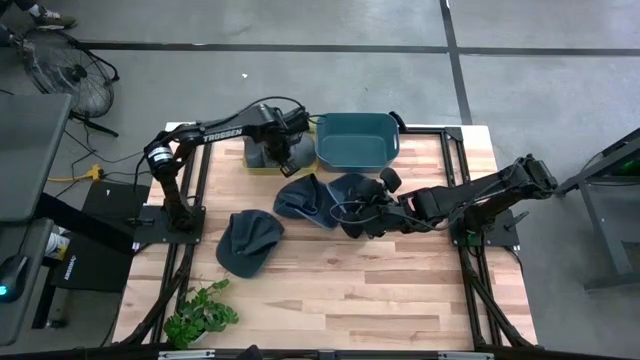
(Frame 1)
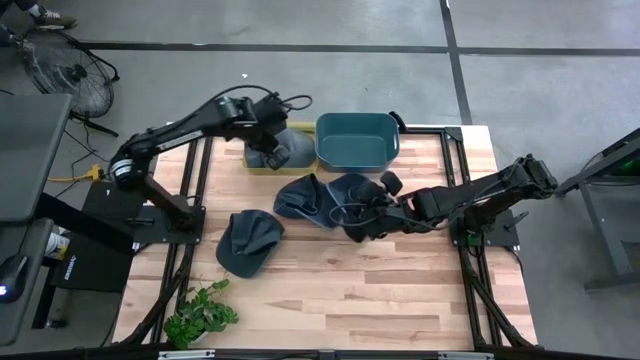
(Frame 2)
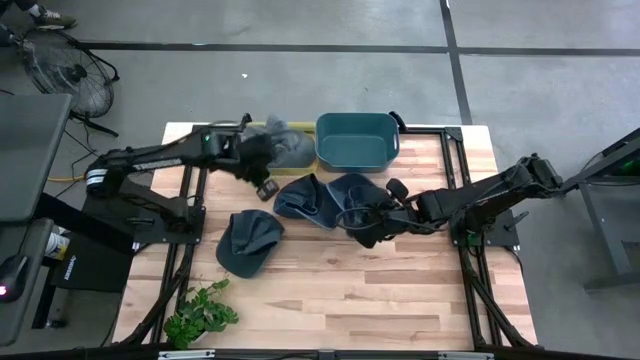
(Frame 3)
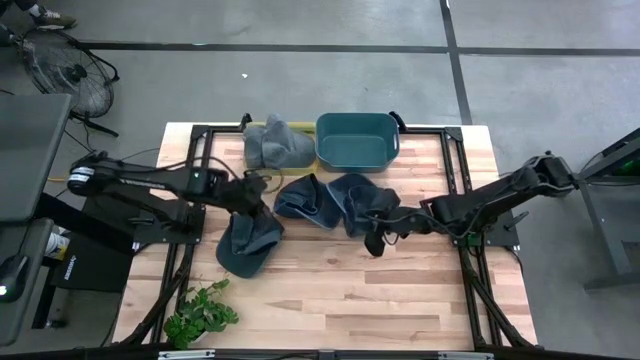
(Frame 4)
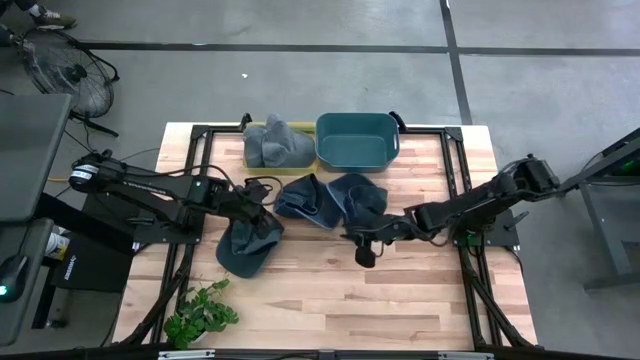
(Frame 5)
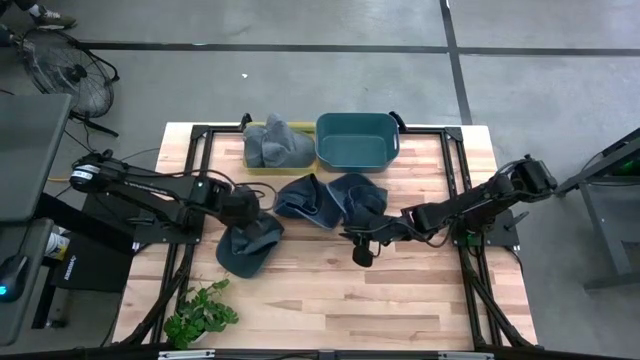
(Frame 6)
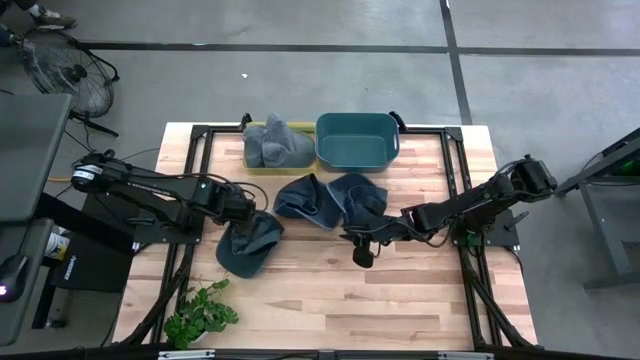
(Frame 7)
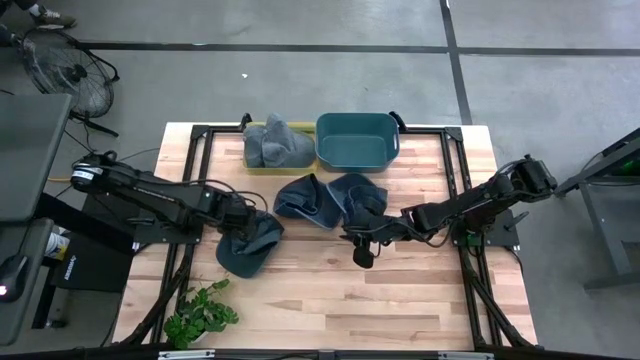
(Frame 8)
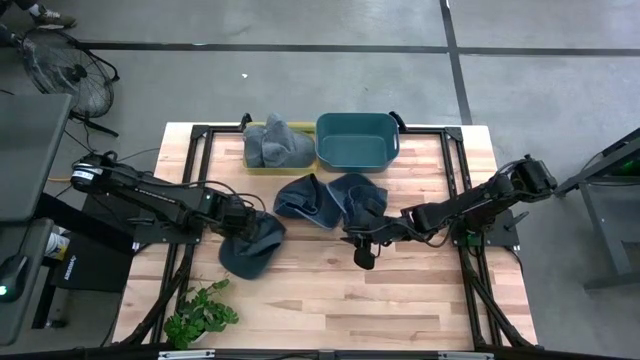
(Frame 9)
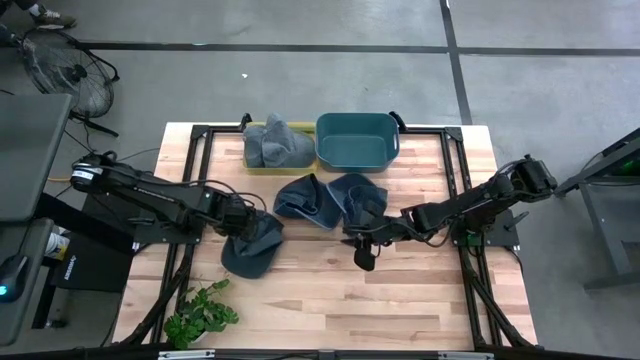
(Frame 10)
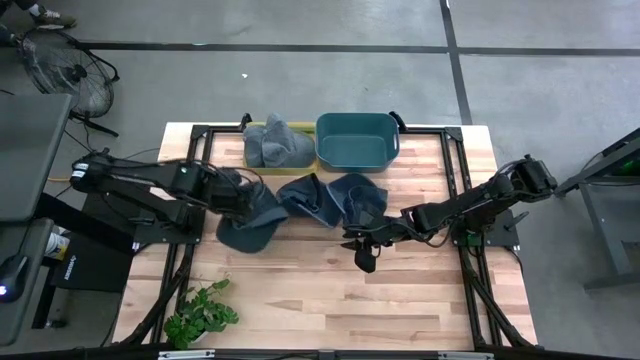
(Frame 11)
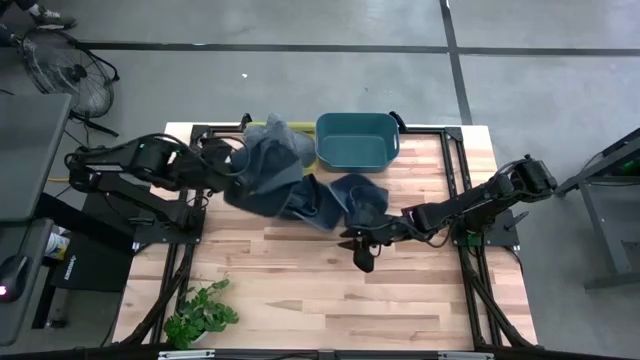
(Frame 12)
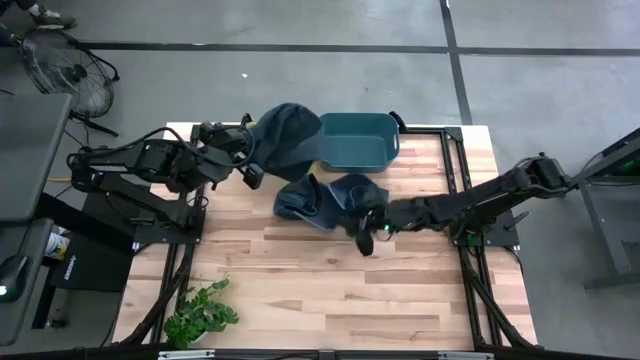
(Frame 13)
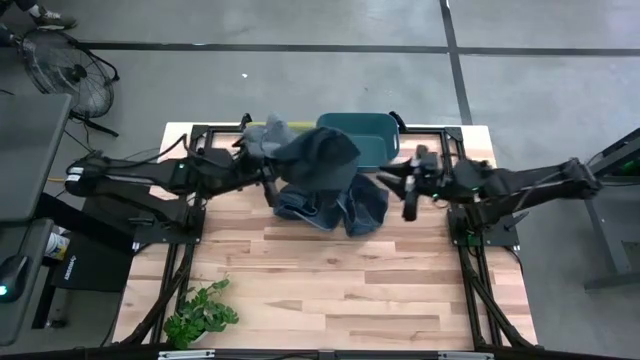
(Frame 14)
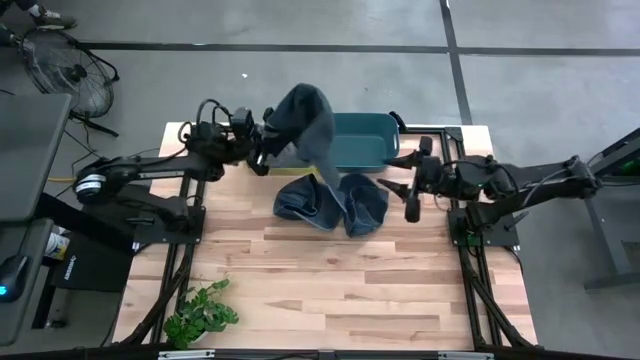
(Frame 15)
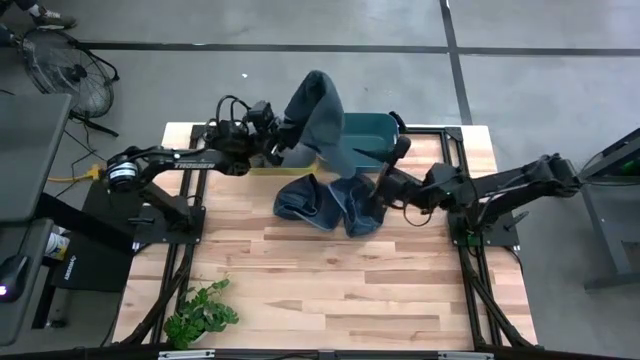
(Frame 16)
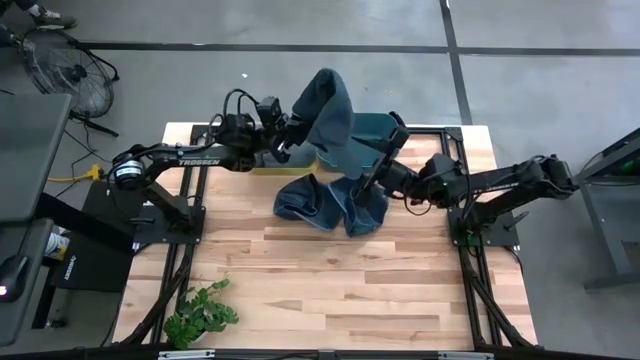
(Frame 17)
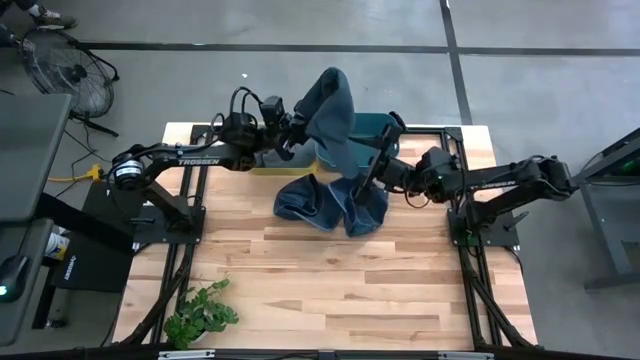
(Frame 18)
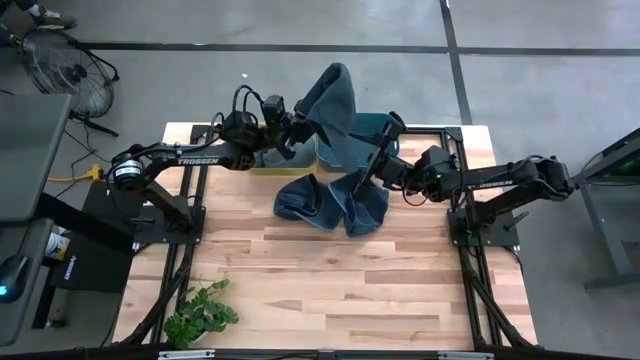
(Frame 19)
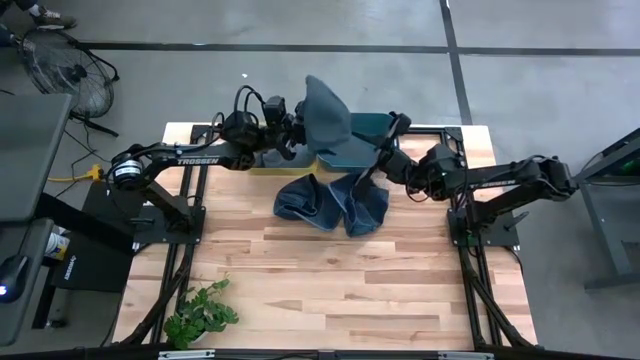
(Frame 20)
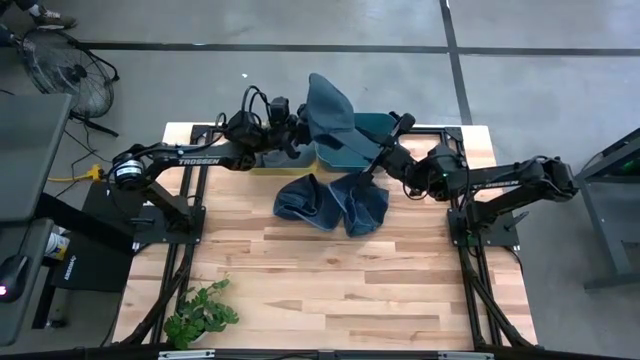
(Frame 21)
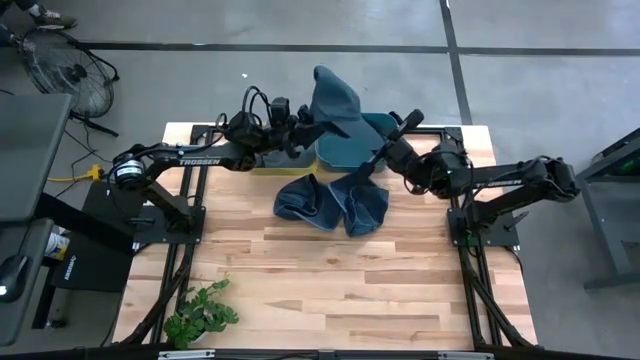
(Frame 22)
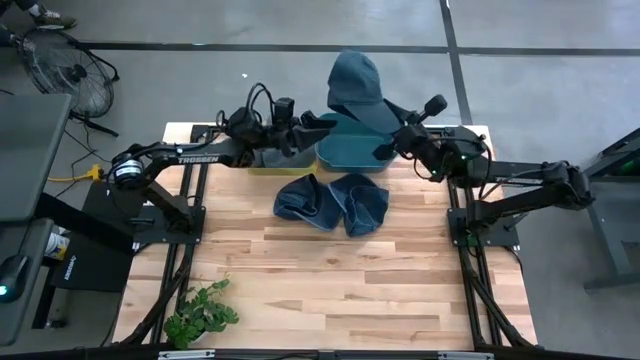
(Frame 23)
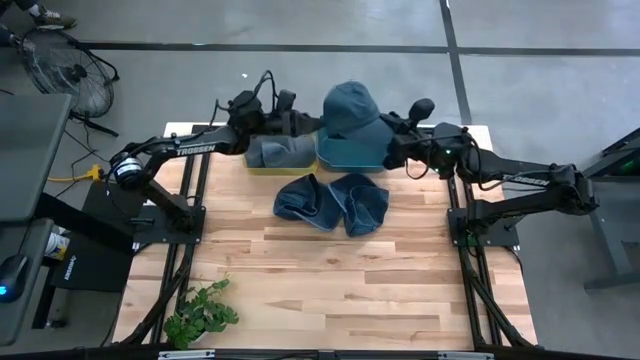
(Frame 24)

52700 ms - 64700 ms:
Task: Pick & Place hat
Put the bottom left blue cap into the blue bin

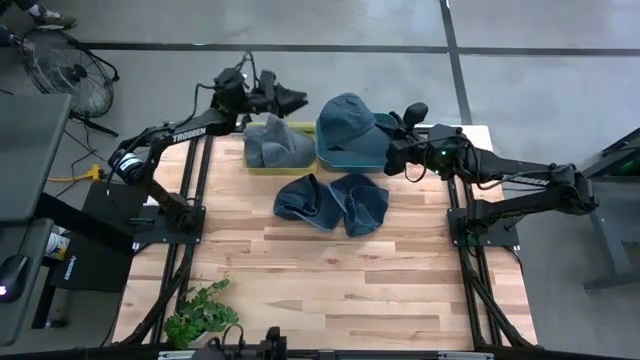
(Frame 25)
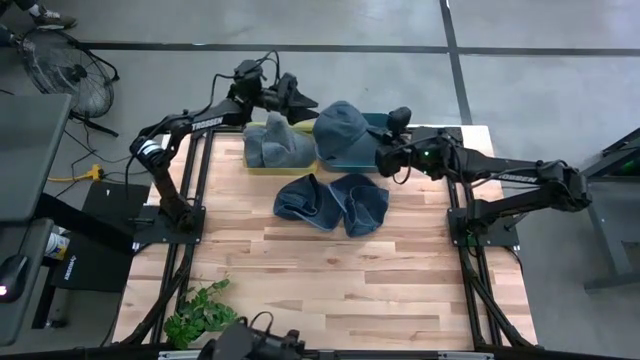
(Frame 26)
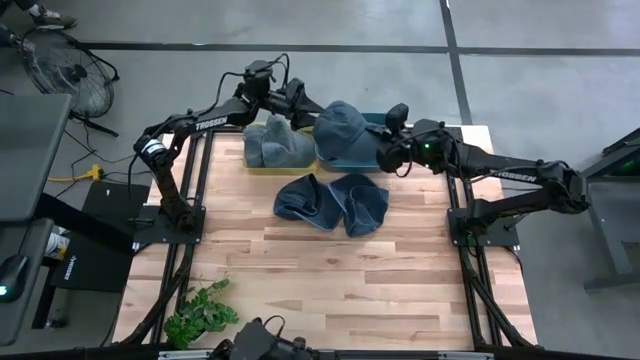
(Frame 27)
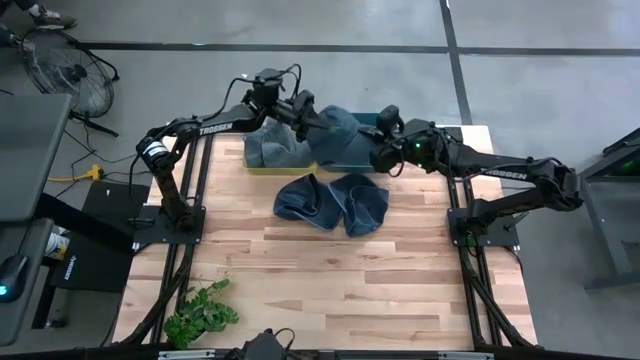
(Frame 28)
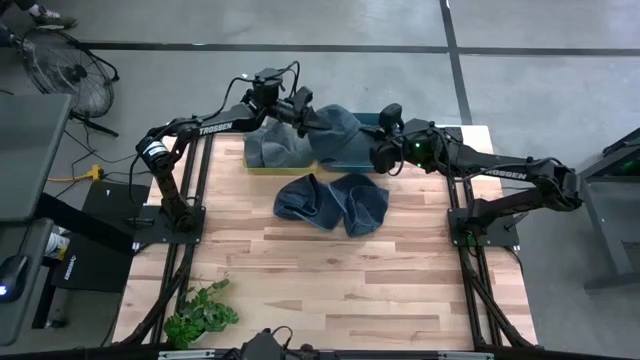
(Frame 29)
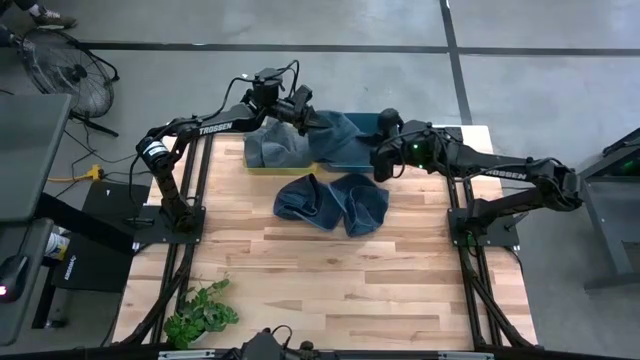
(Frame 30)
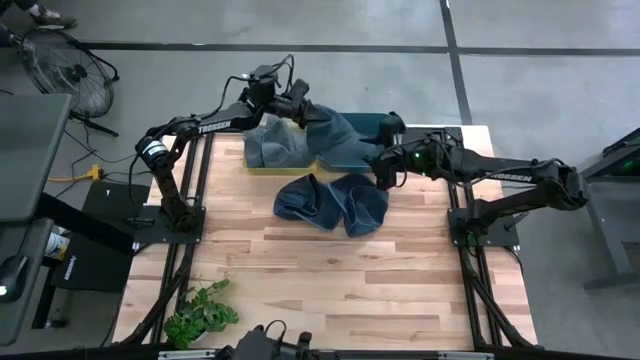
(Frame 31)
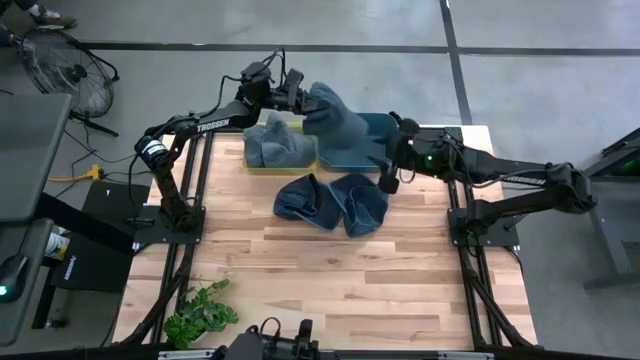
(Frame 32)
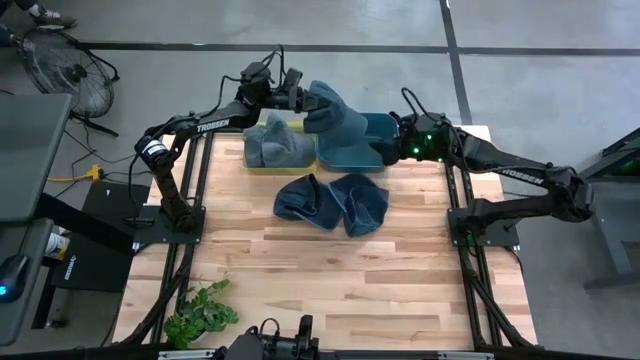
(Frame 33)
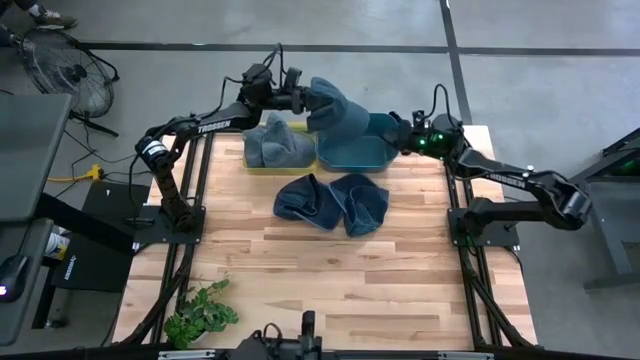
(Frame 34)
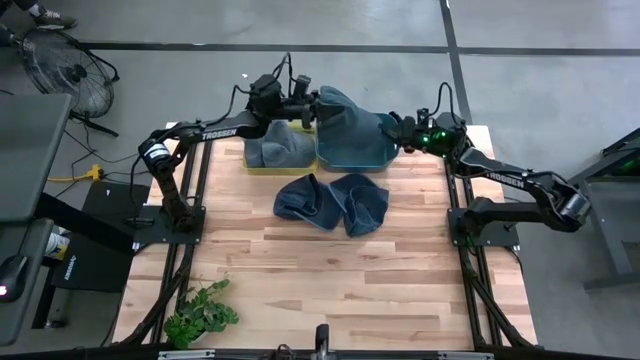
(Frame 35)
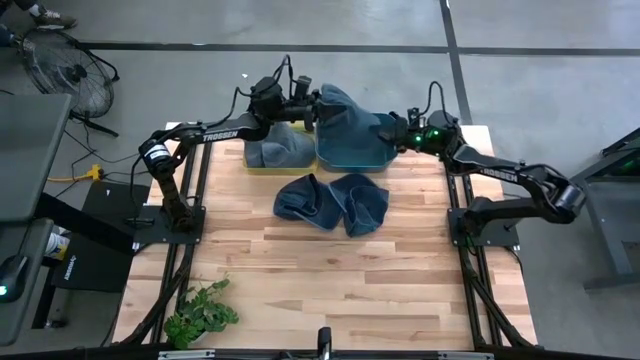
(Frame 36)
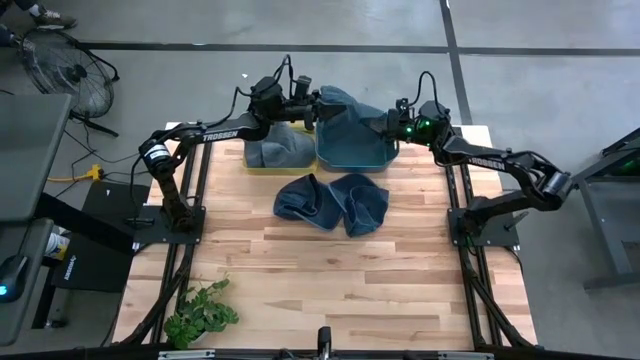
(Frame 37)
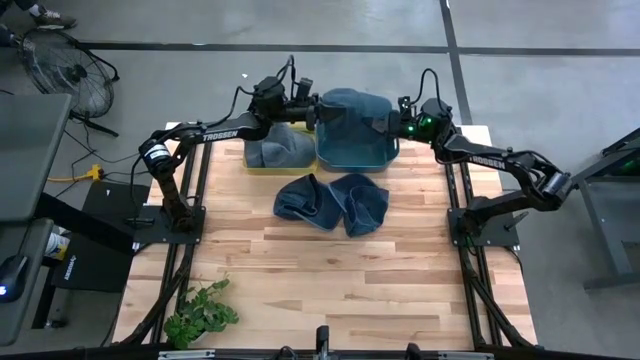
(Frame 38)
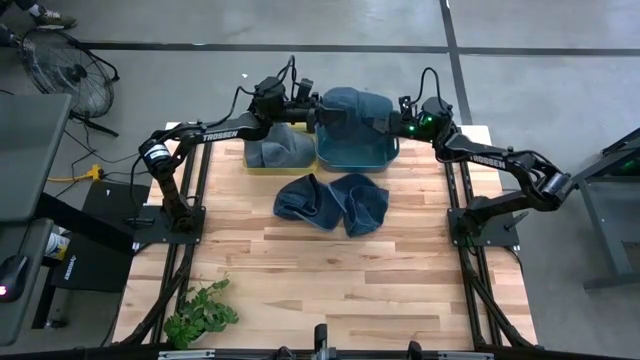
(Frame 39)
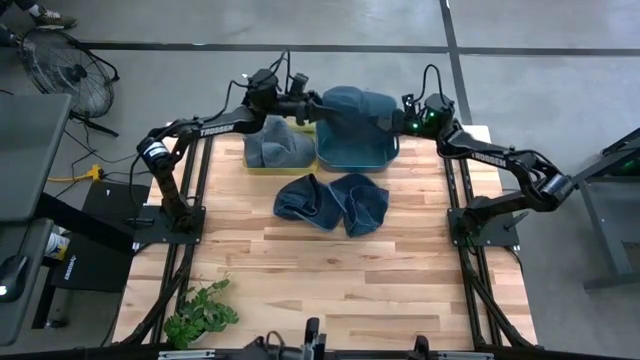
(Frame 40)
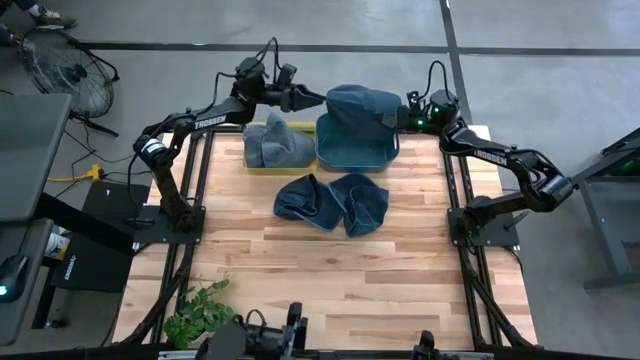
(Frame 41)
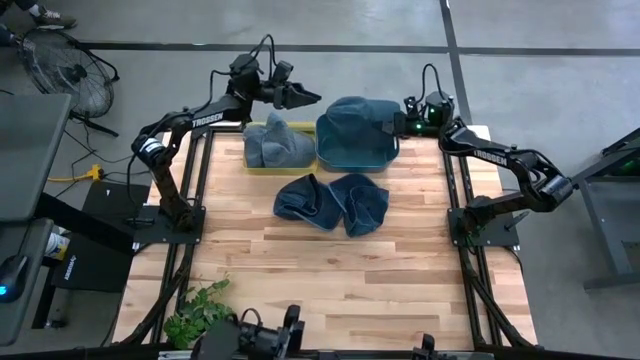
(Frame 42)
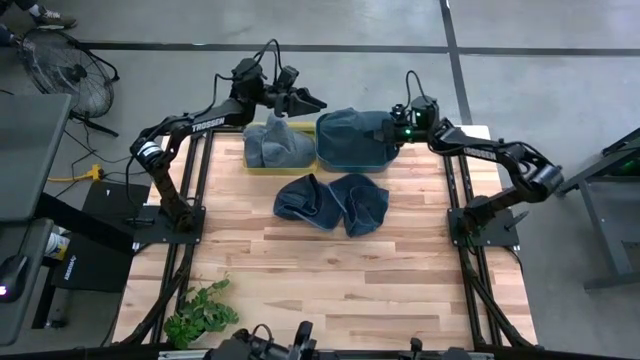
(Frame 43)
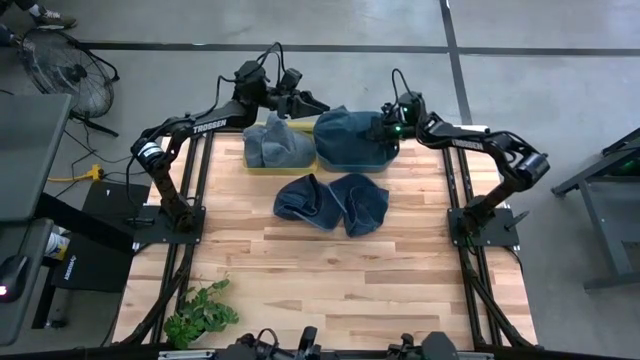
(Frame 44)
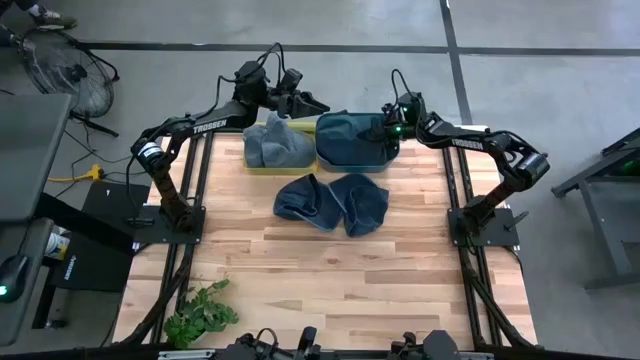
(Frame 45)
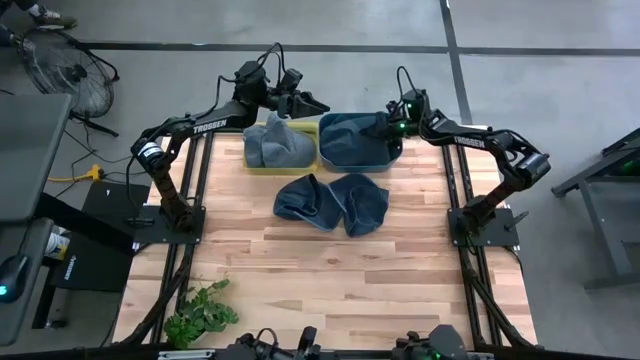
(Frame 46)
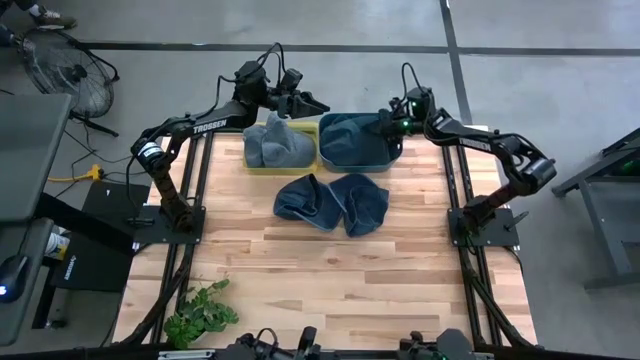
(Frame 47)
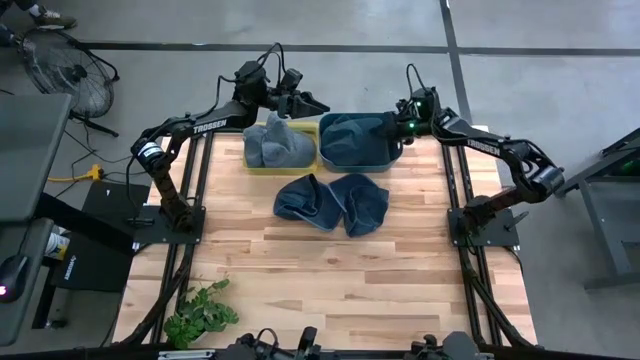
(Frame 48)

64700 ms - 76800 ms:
Put the bottom left blue cap into the blue bin
